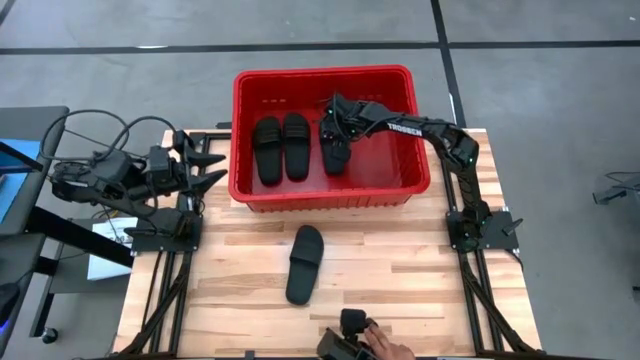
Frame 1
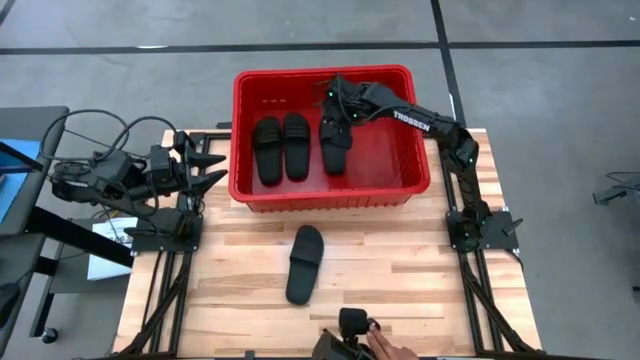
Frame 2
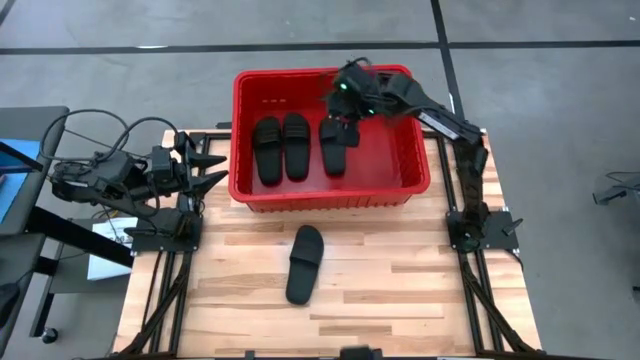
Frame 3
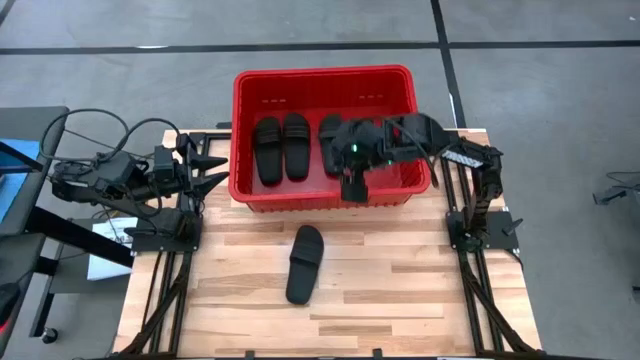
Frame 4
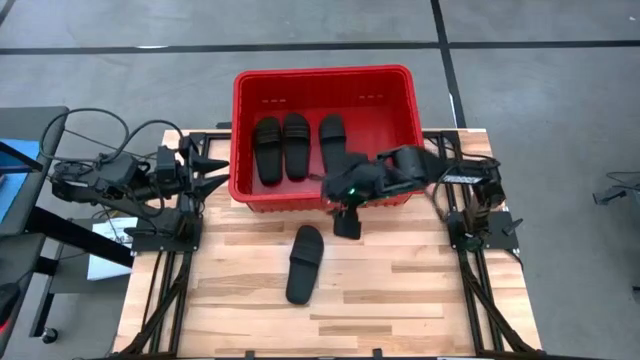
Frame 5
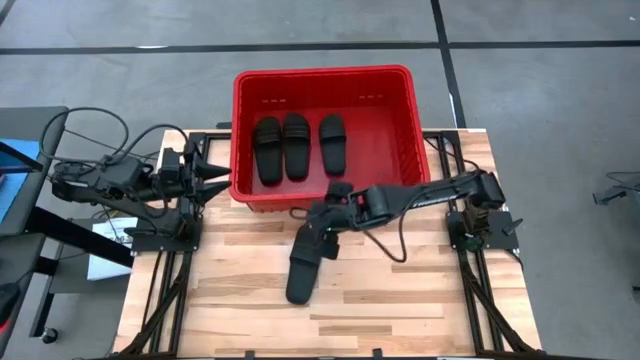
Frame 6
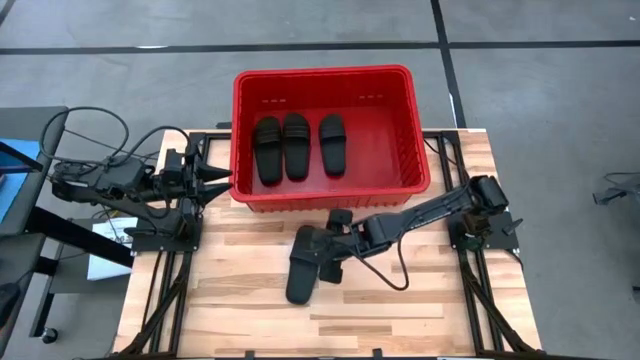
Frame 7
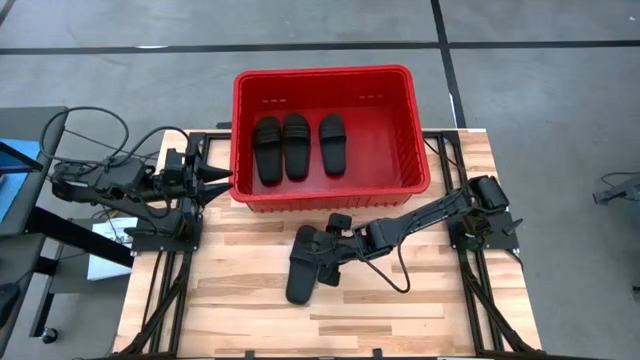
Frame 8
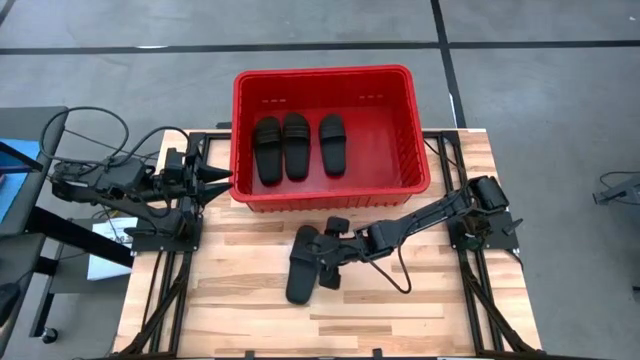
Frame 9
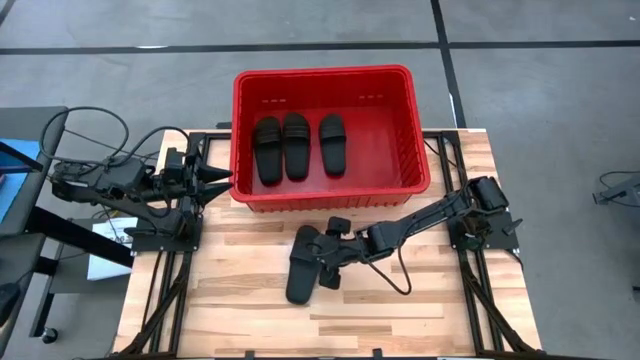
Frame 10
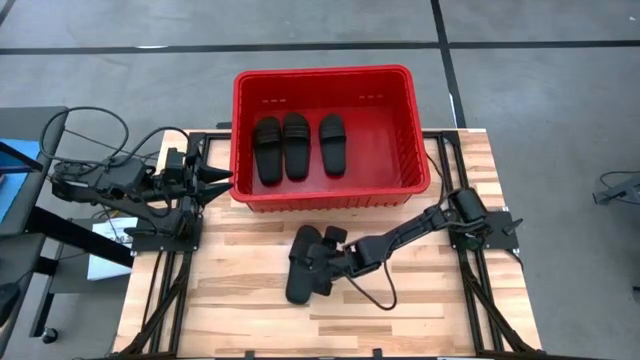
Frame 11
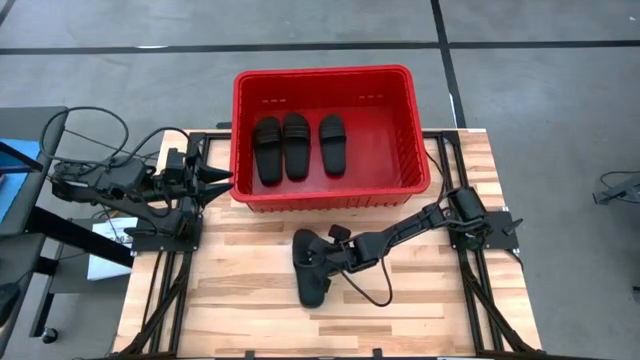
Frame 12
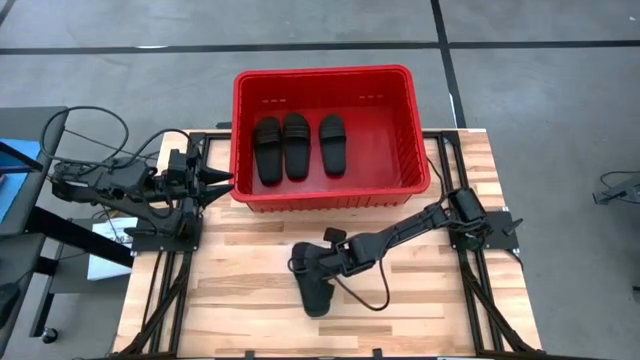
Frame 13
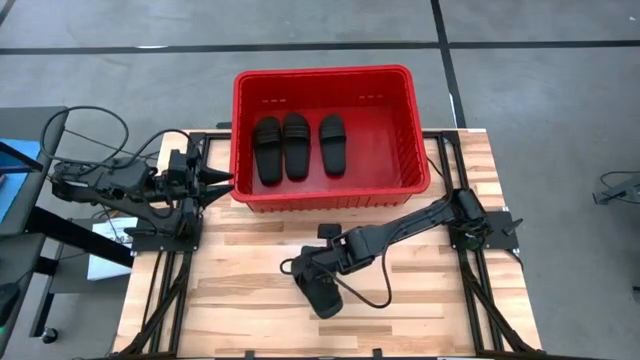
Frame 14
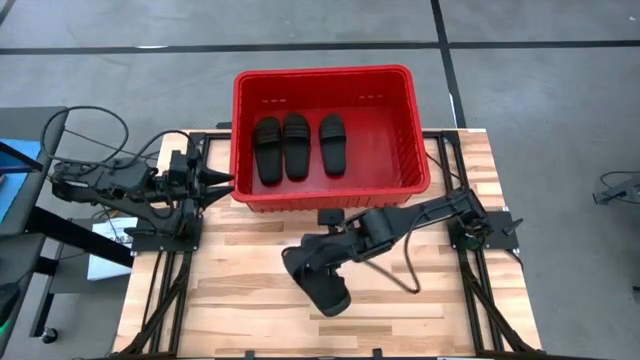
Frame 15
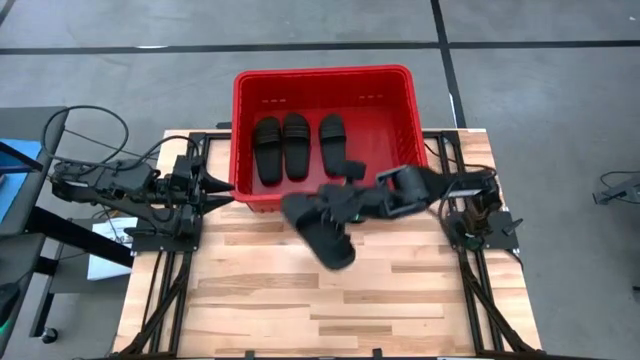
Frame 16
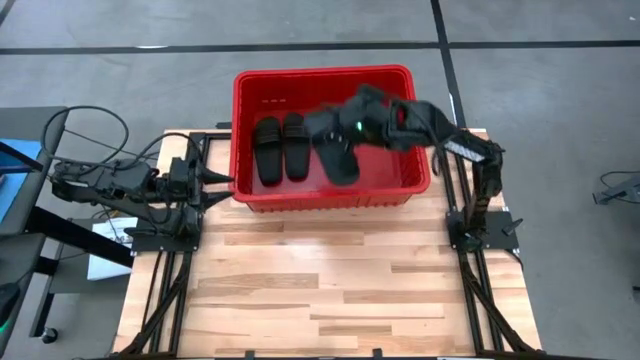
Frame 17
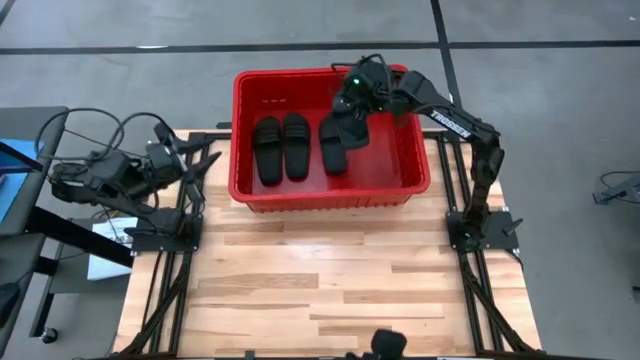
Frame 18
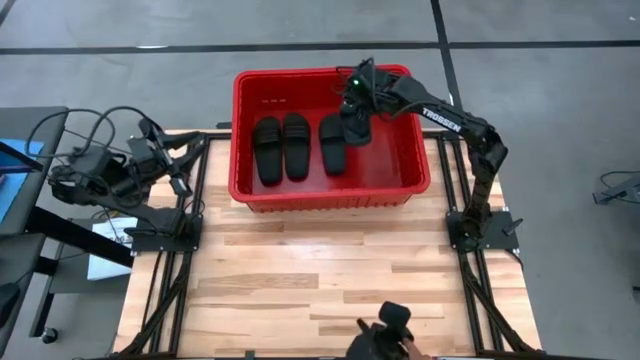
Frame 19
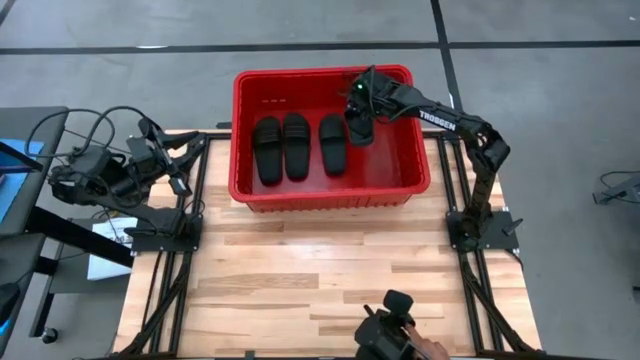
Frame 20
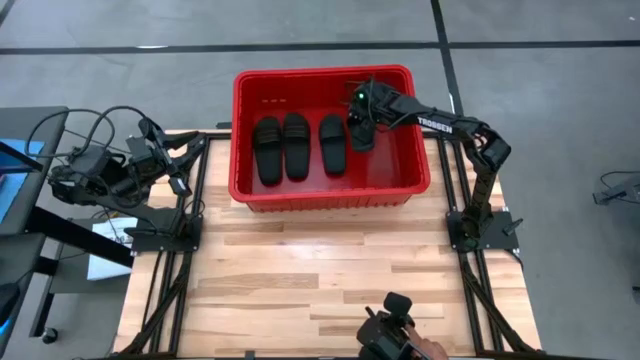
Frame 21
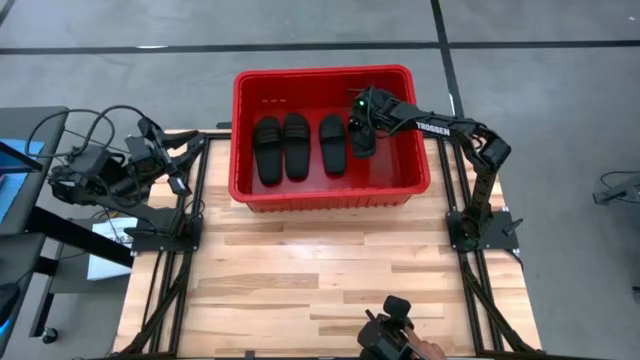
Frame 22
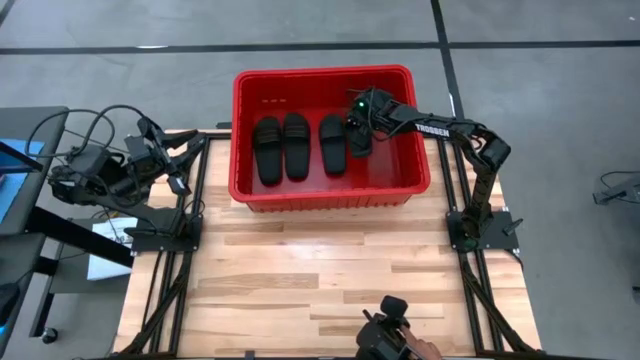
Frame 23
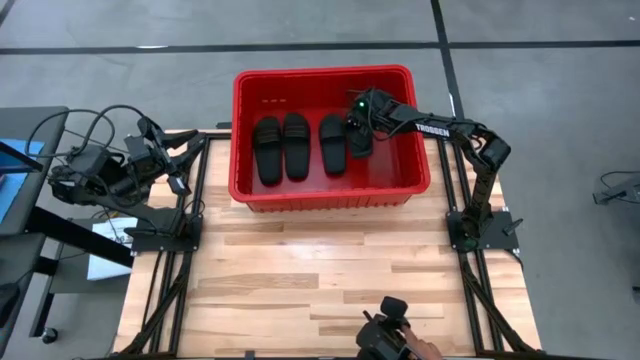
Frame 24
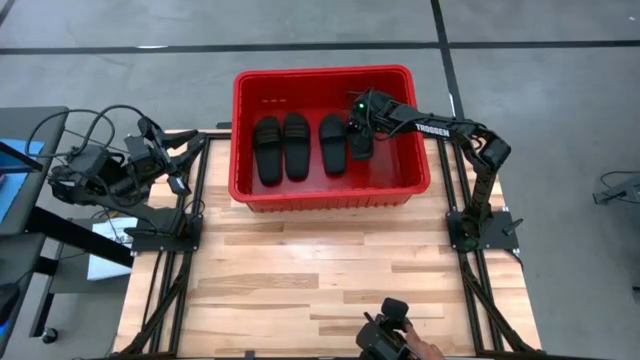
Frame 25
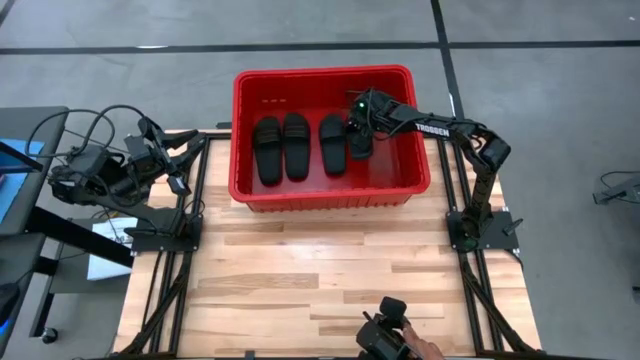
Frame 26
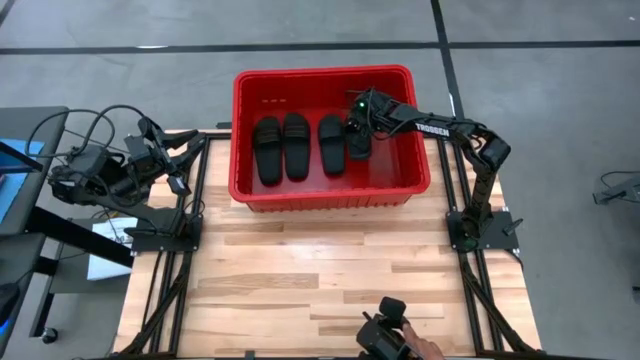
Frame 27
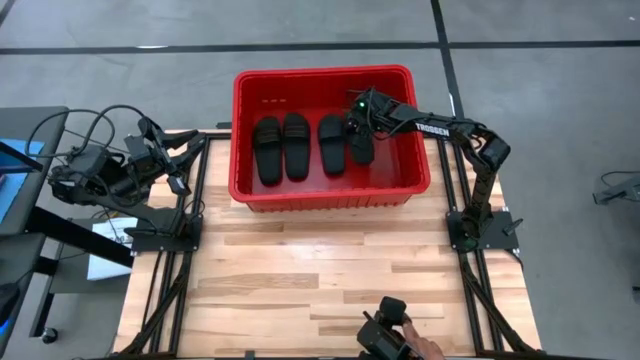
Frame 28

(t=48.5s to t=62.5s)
Task: Pick and place slides into bin
Put the black slide into the red container

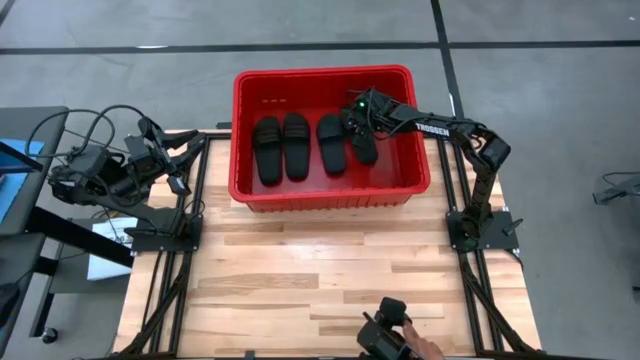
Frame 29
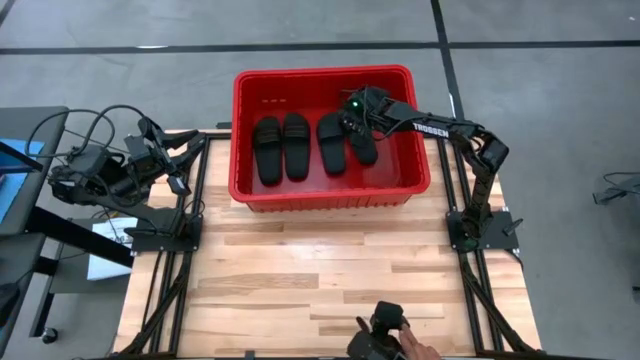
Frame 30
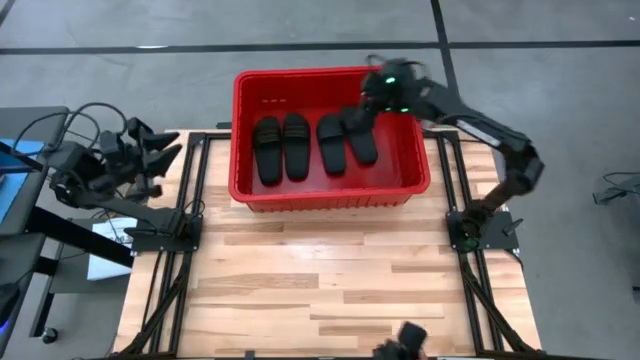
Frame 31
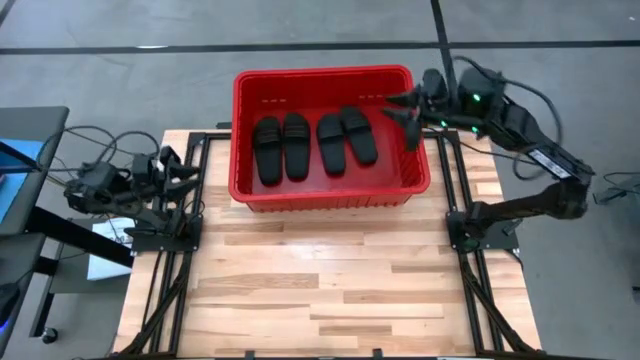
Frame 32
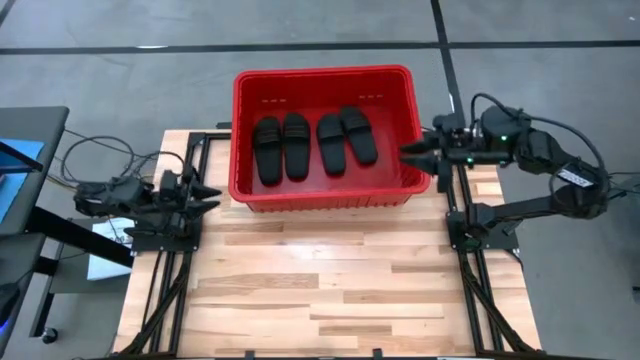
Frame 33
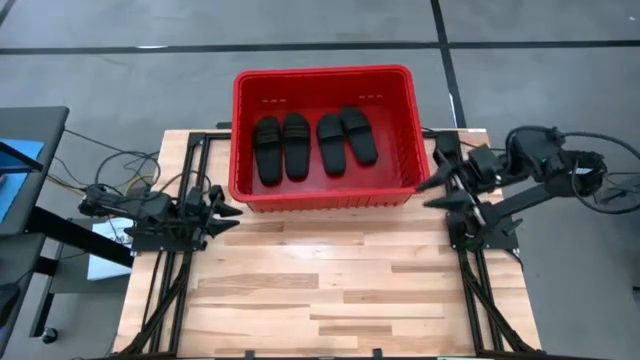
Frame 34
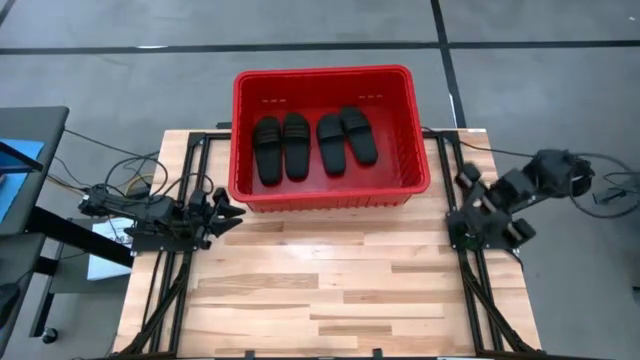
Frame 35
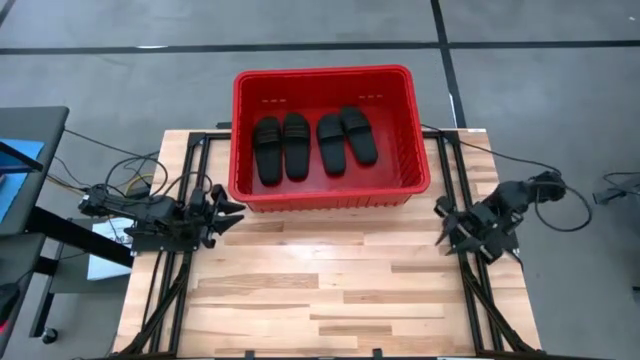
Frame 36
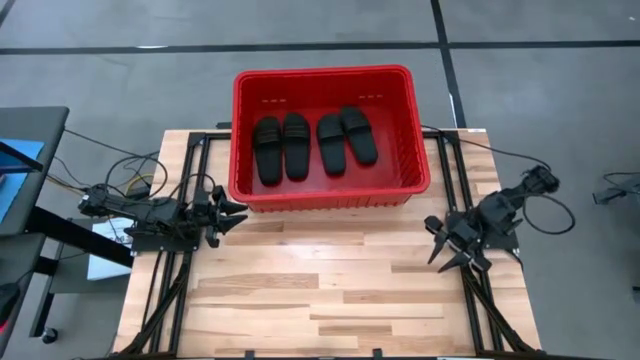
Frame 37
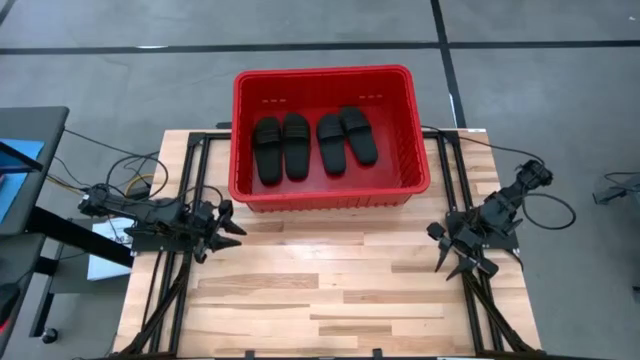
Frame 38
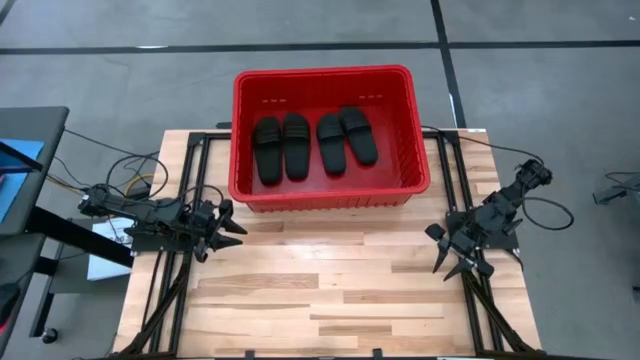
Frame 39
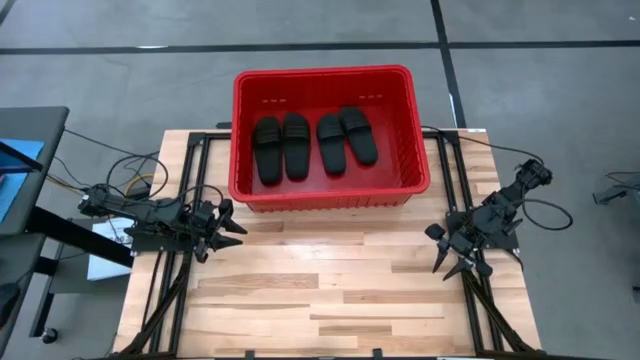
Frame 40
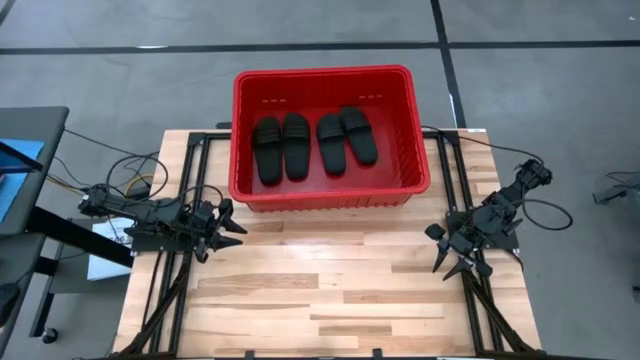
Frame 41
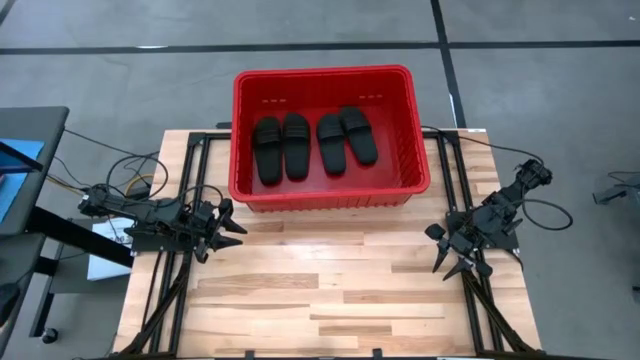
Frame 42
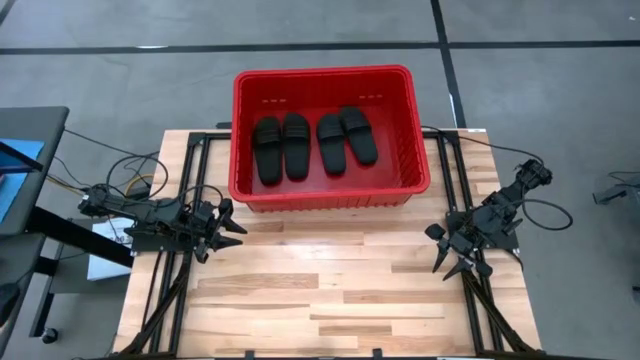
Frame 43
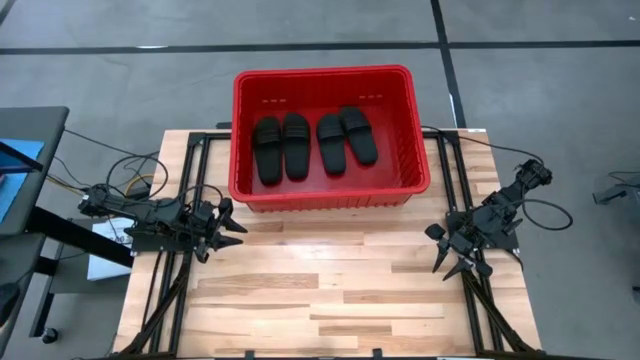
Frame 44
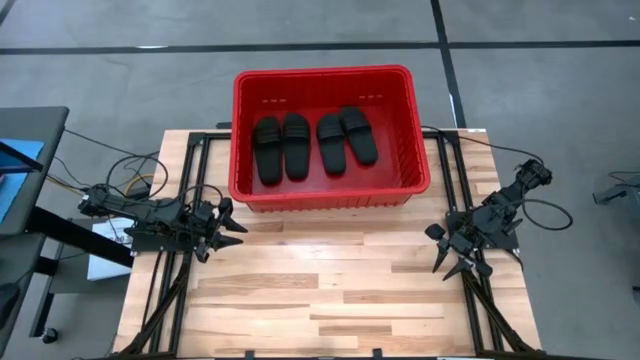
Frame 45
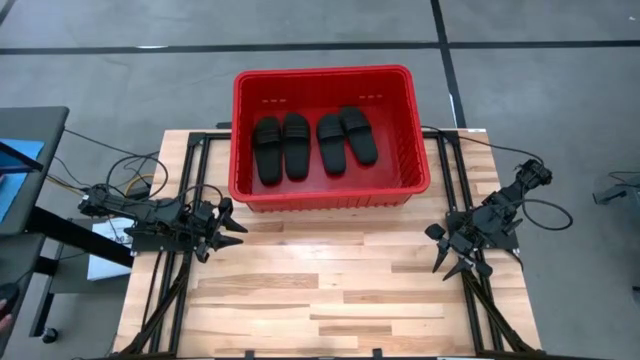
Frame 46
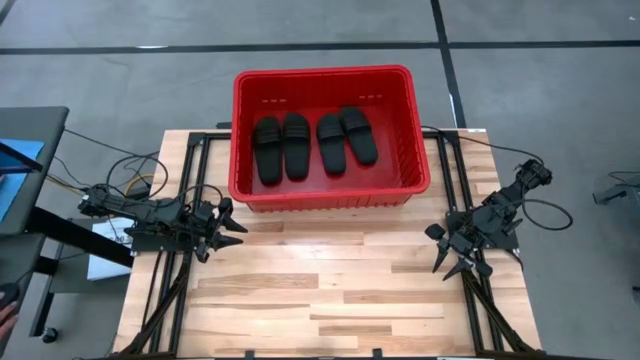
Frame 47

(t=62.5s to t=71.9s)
Return to Home Position
